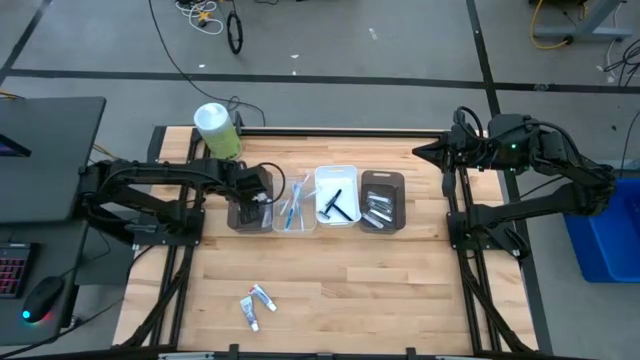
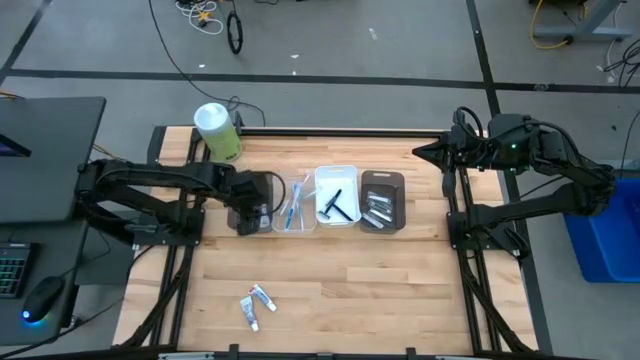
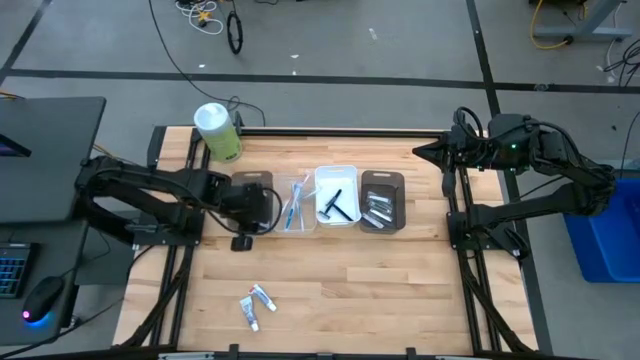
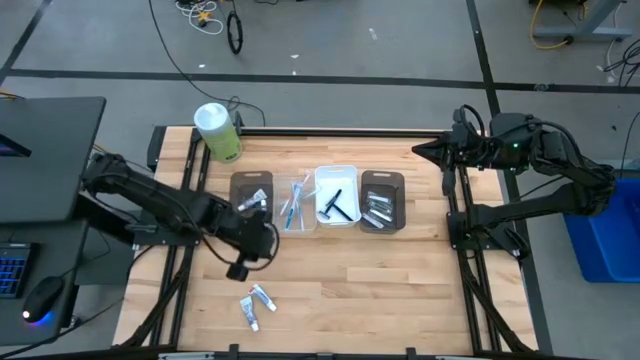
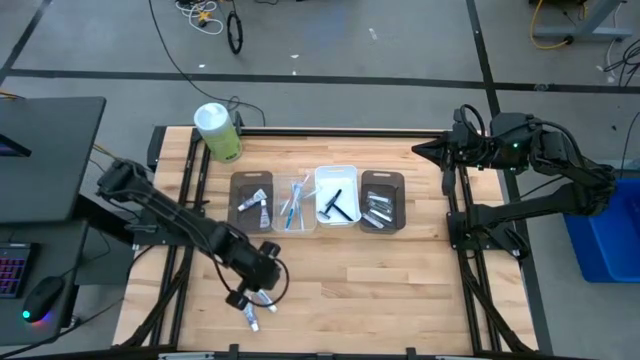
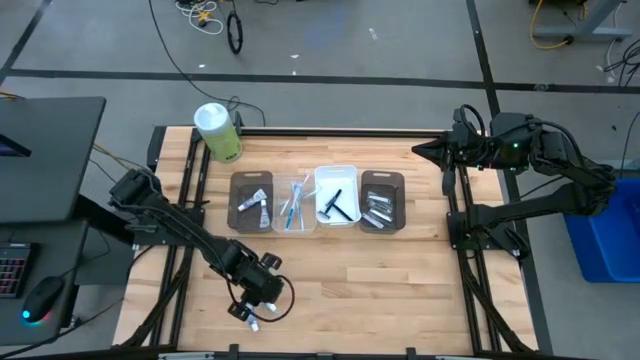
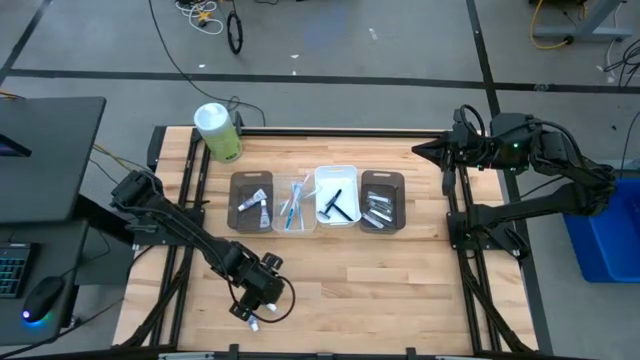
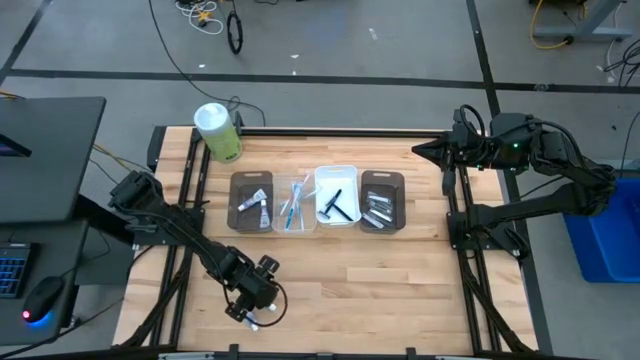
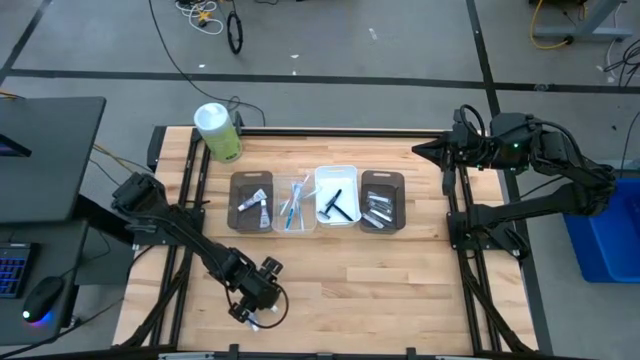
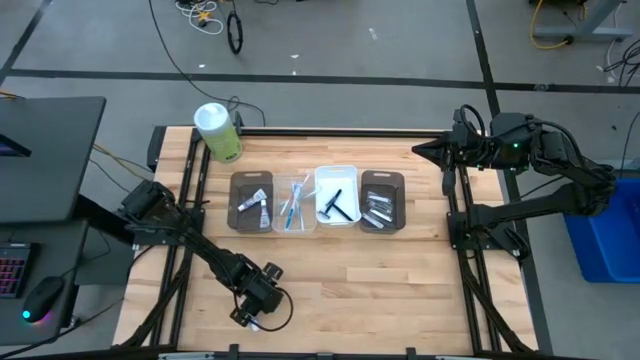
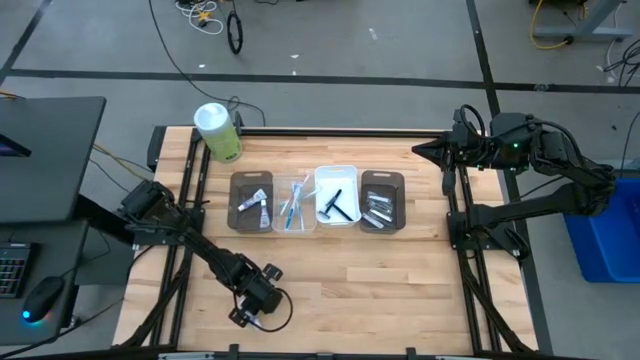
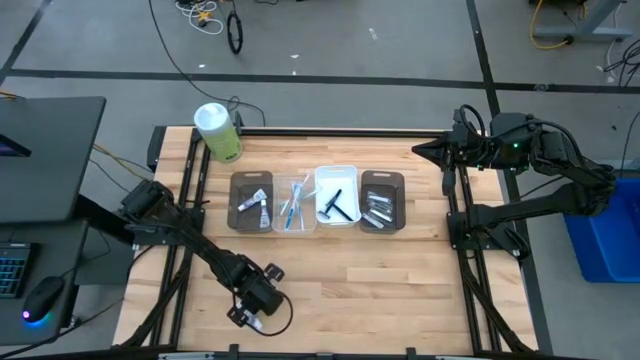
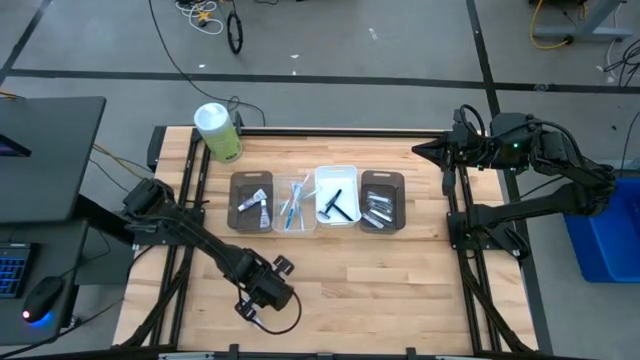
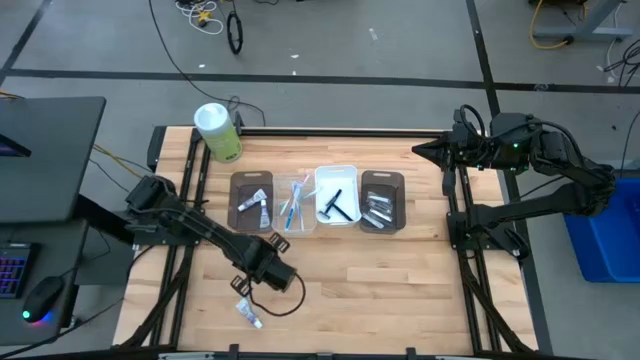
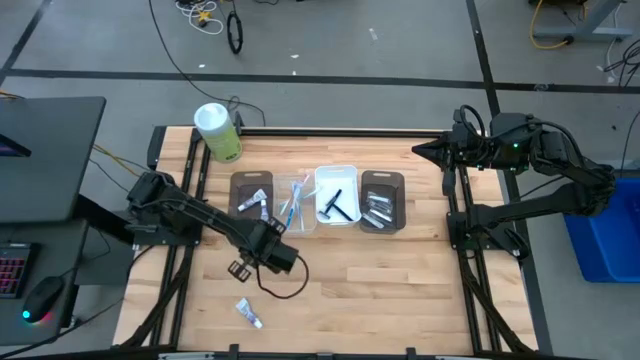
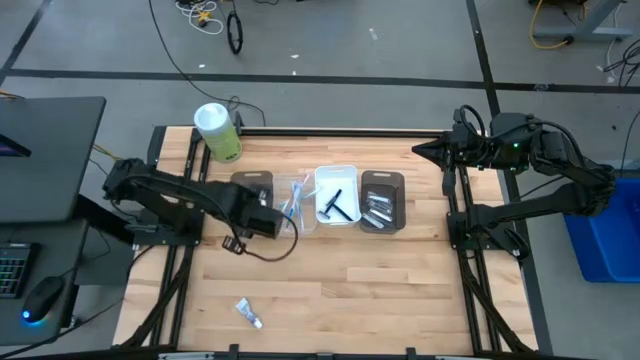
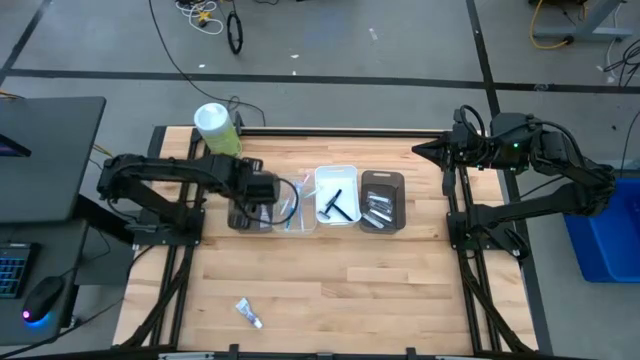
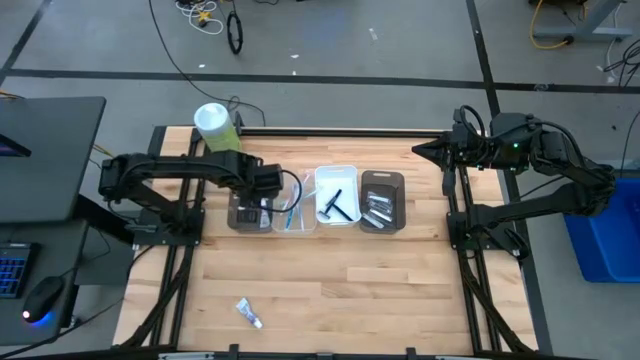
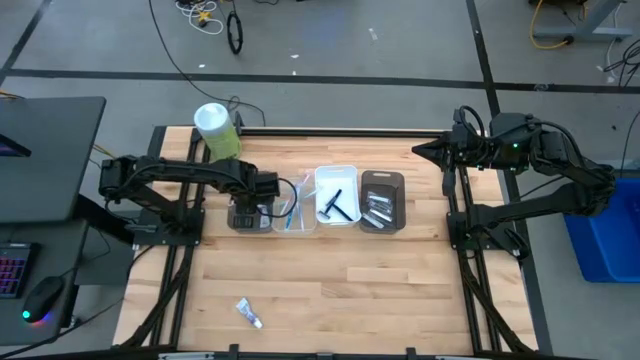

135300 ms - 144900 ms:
Task: Pick & Place Travel size toiletries
Put the white toothpaste into the left black bin

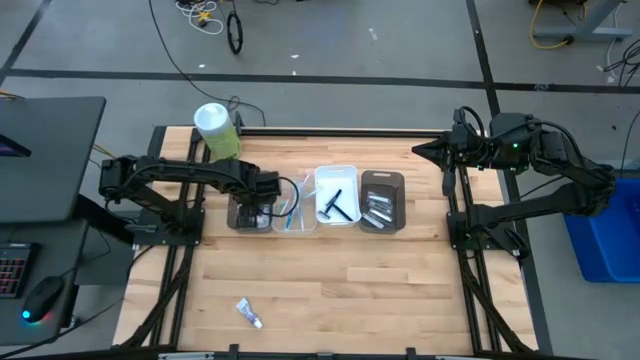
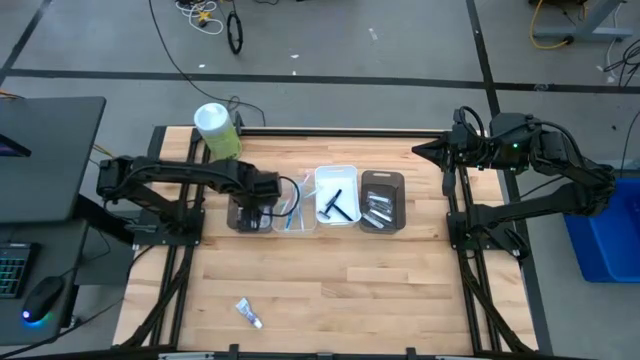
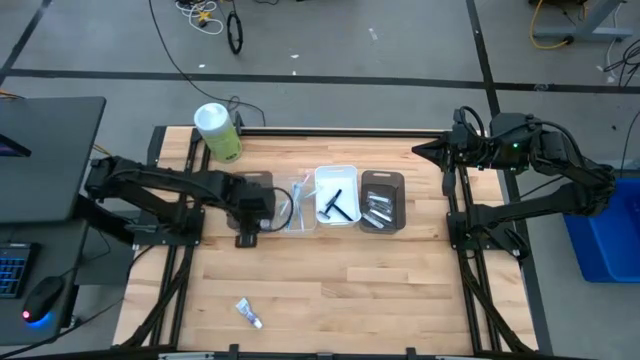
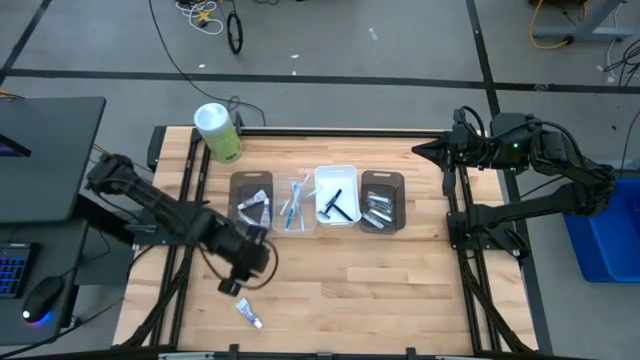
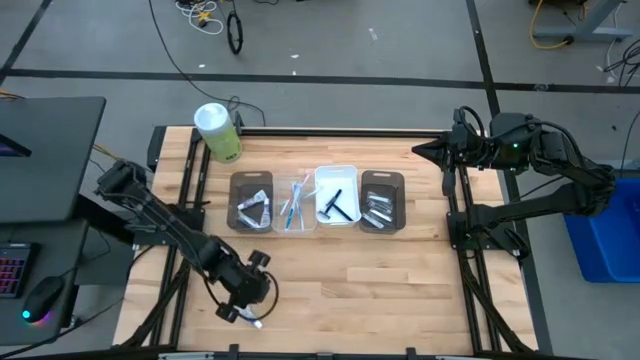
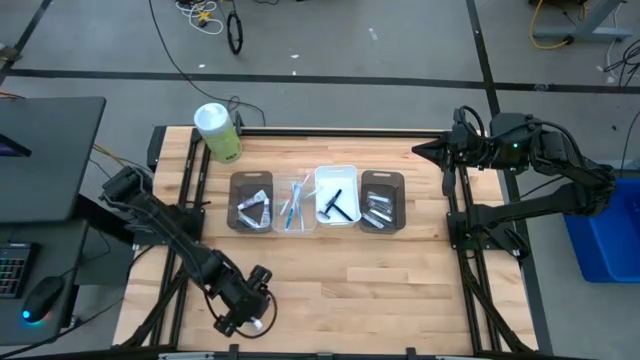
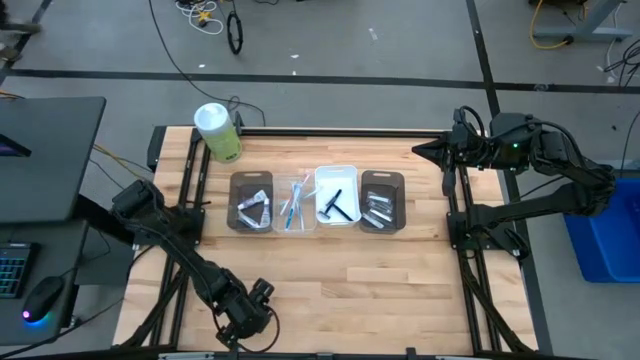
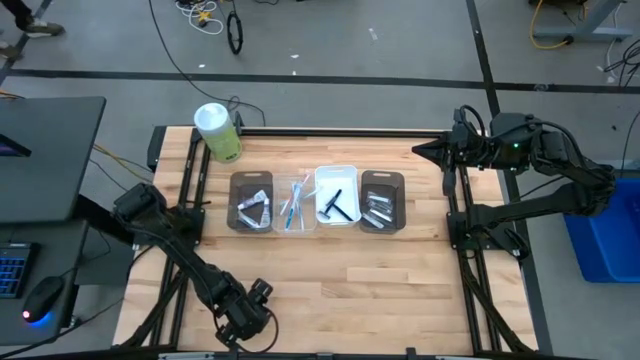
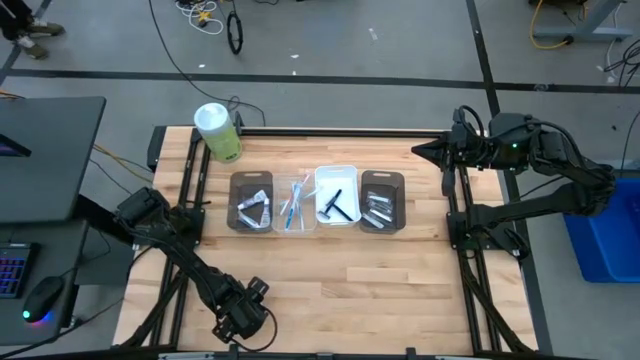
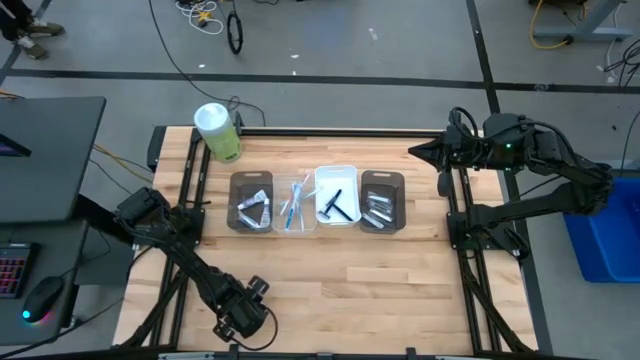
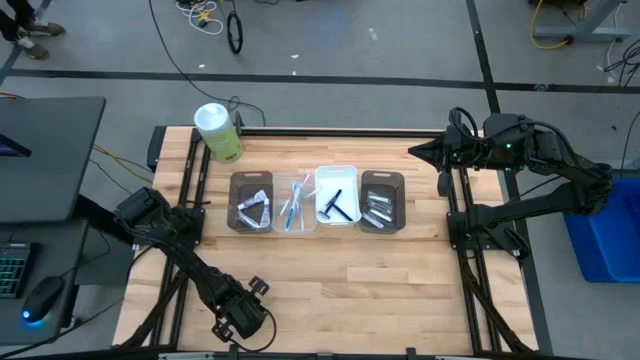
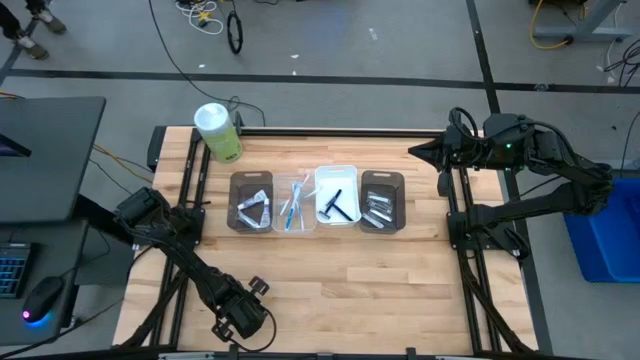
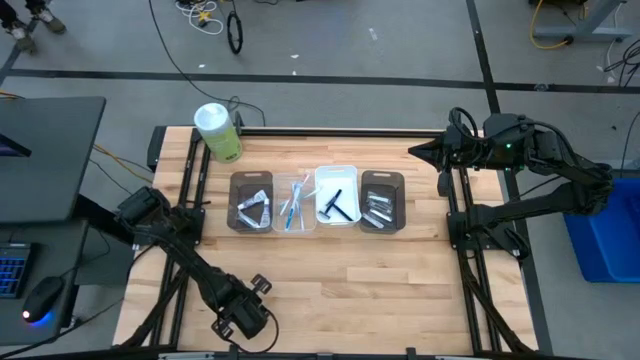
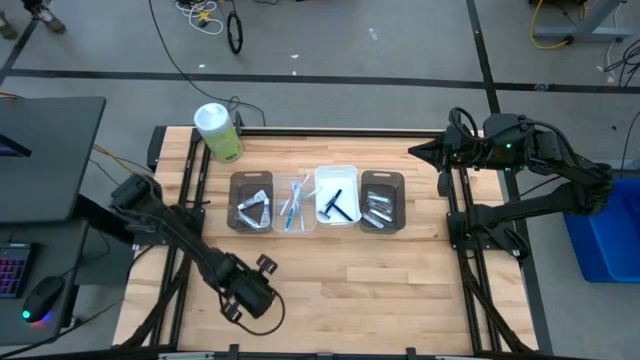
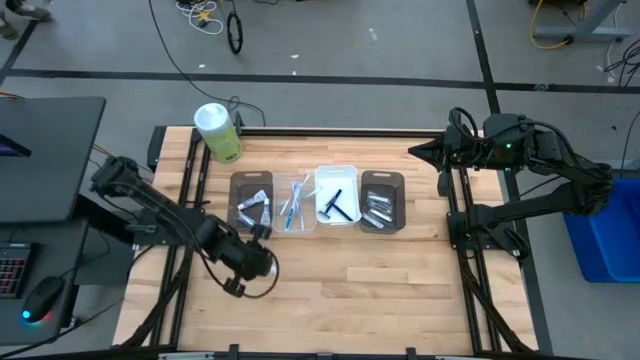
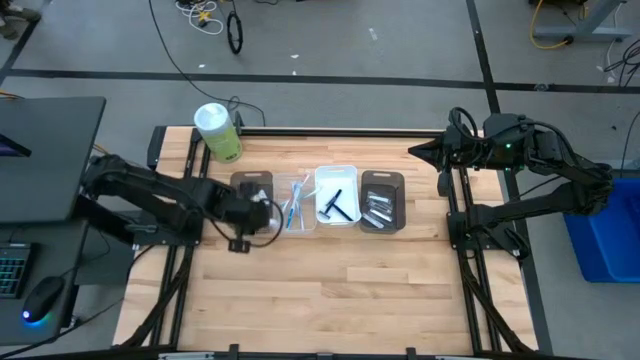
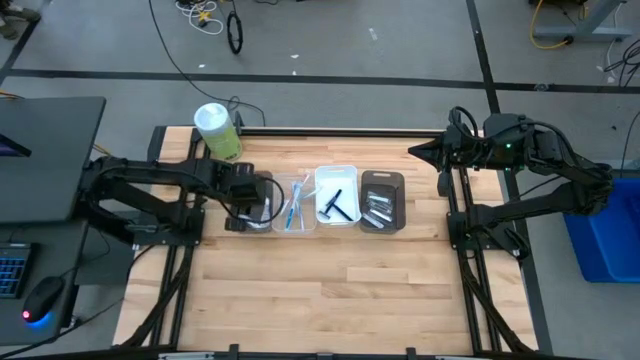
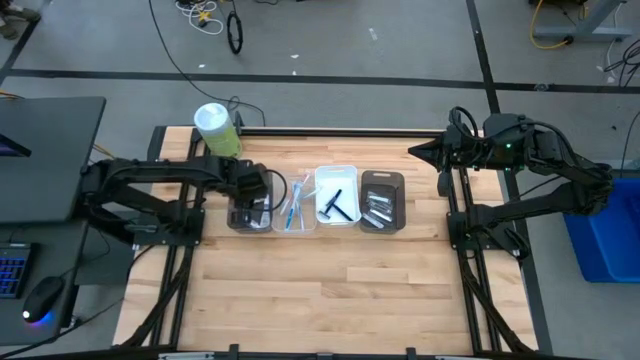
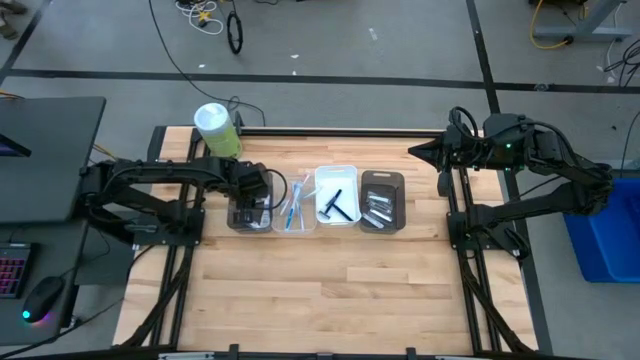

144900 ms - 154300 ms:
Put the white toothpaste into the left black bin
